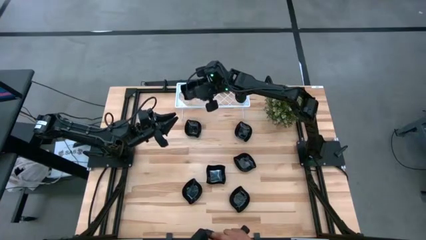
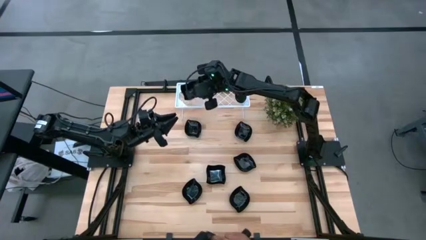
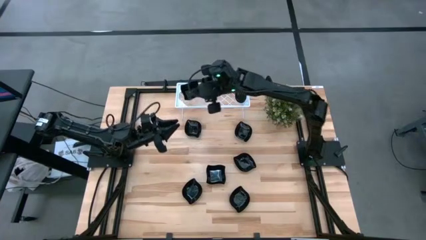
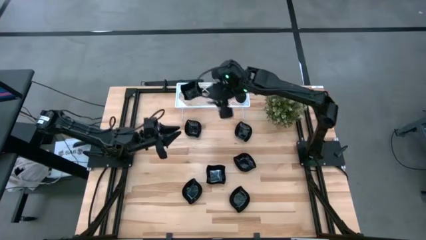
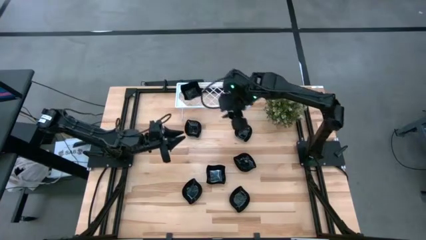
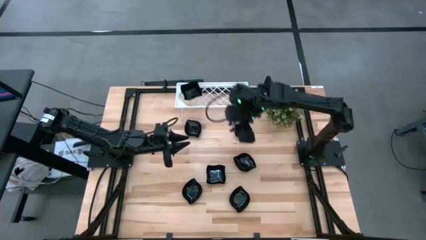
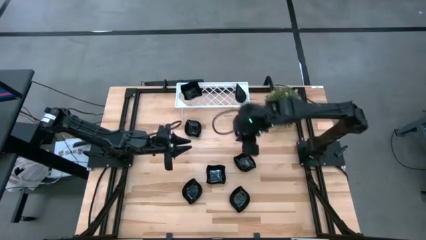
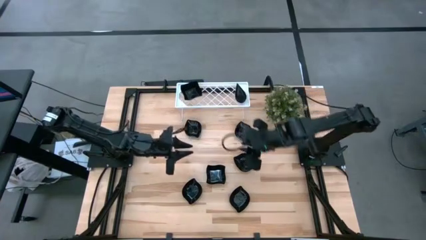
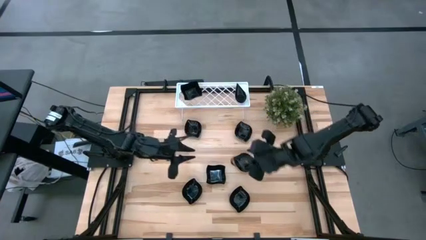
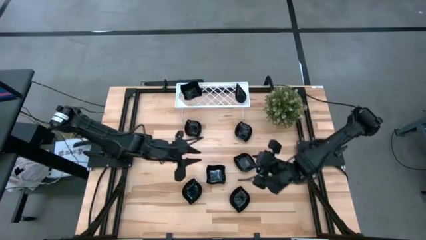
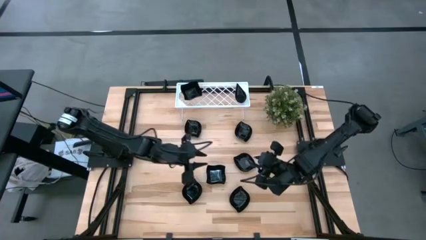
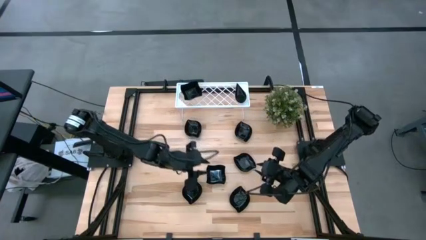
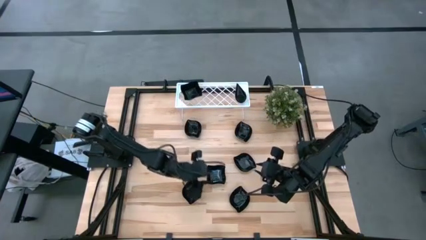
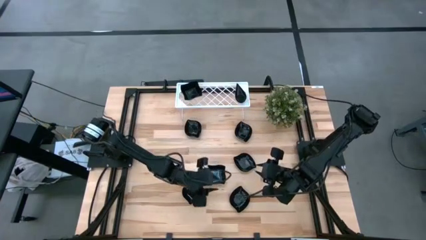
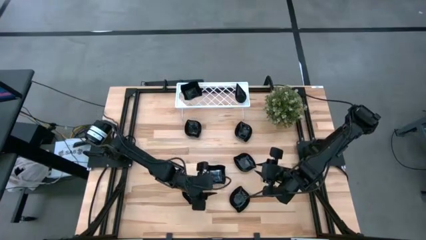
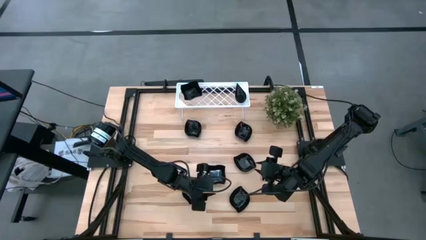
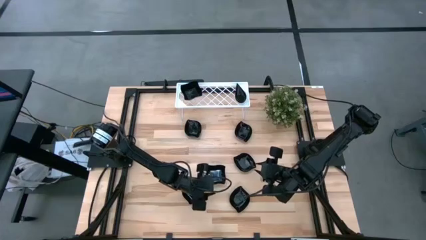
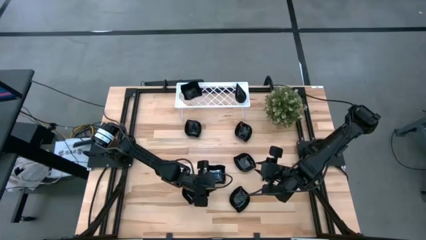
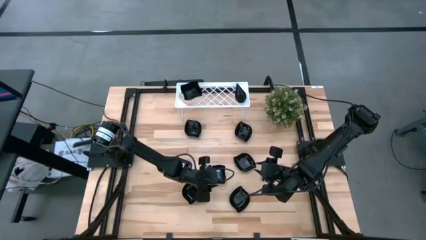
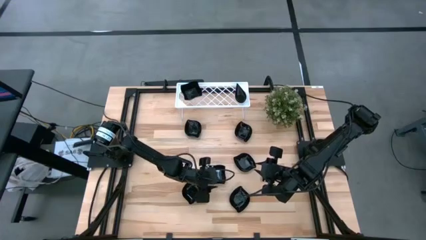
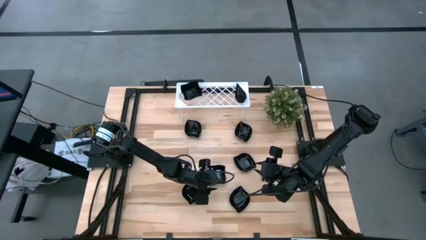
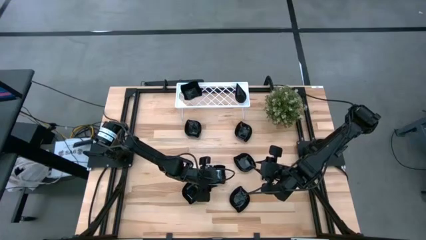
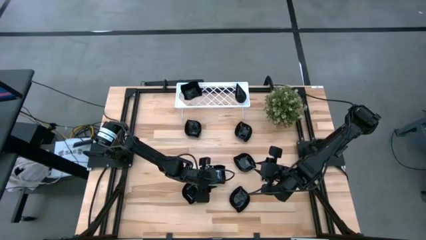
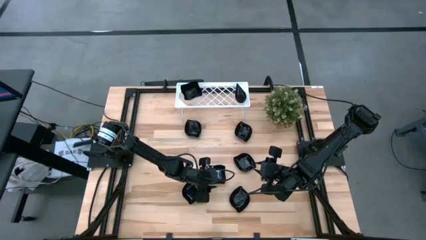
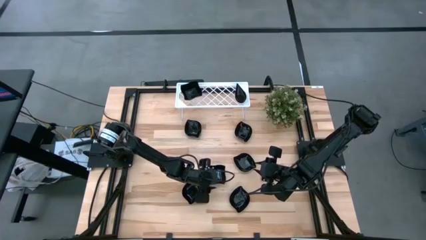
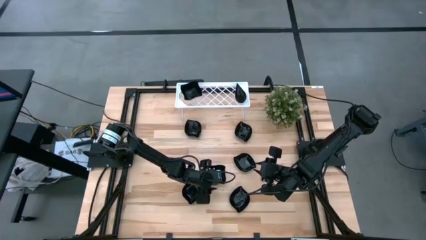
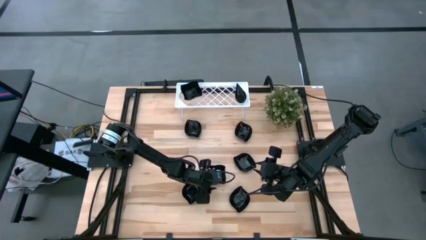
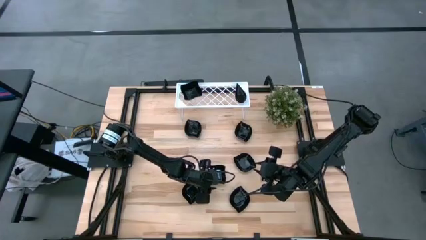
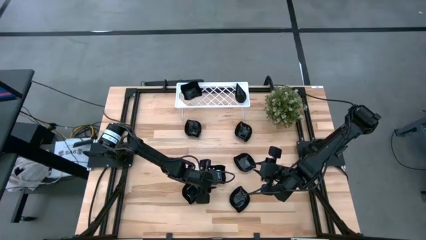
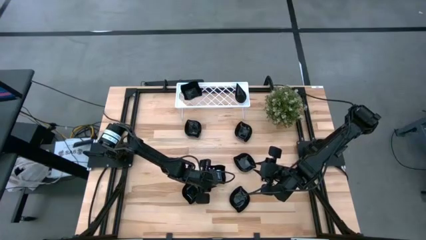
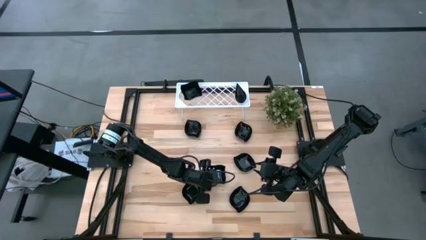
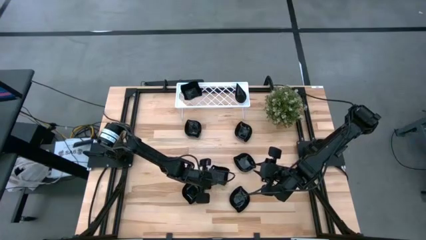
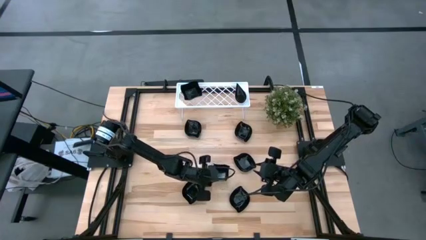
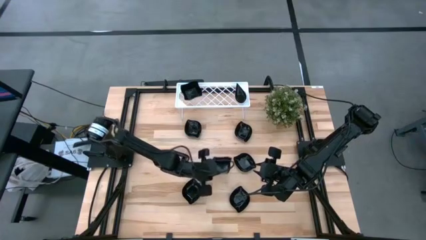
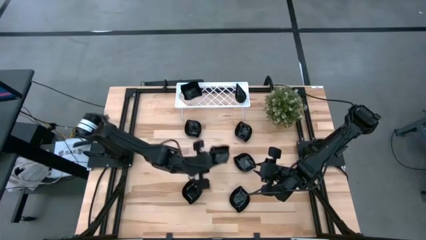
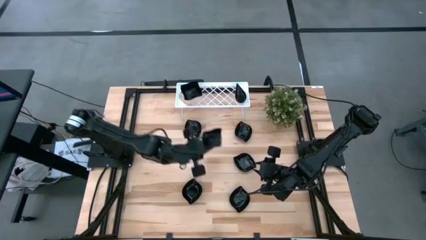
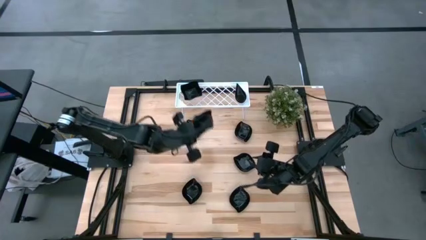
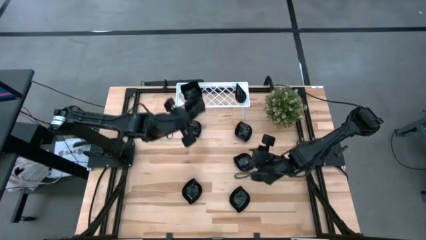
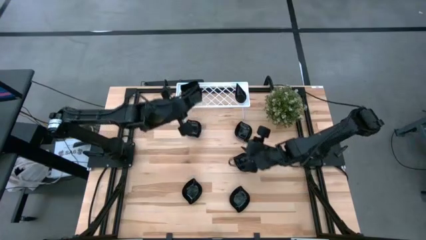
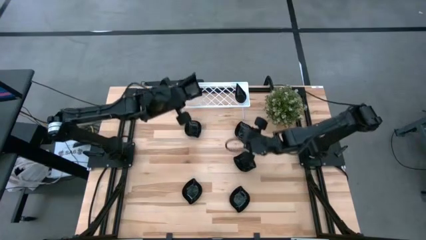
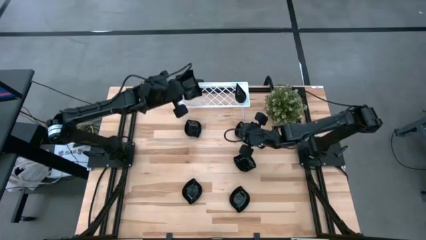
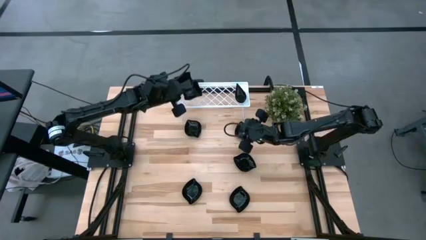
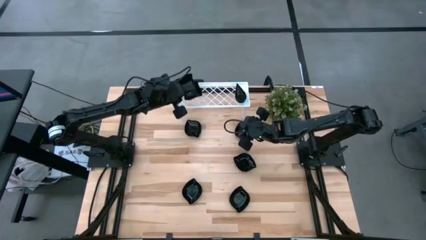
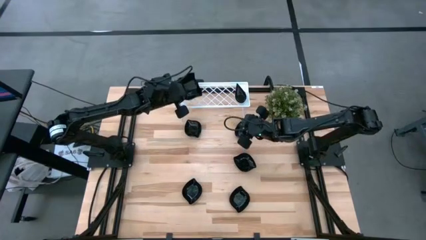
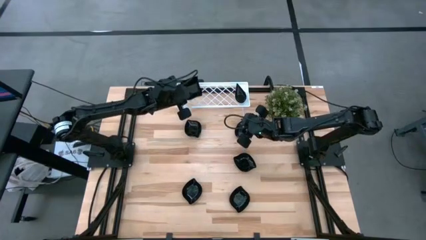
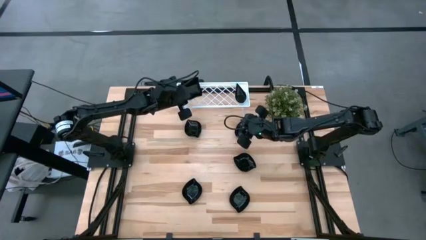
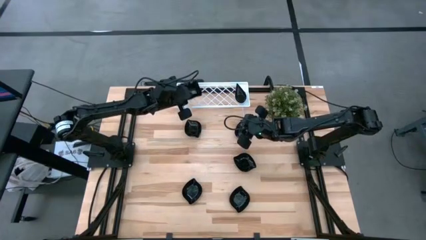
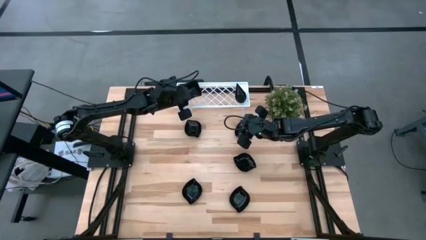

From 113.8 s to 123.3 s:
Task: Pick & Place Mini shaped plates
Stack the distorted square plate on top of the distorted square plate on the shelf

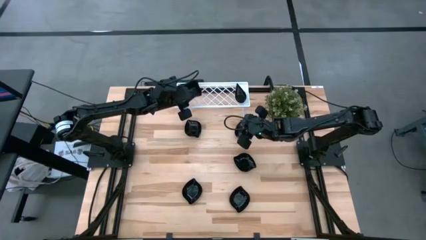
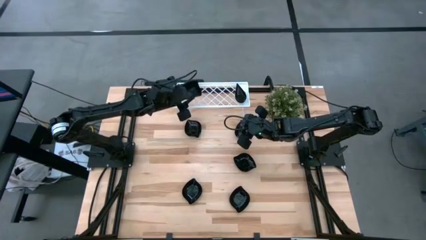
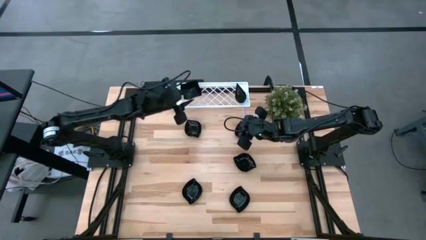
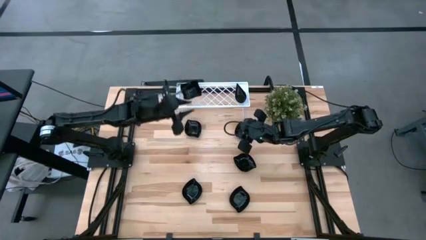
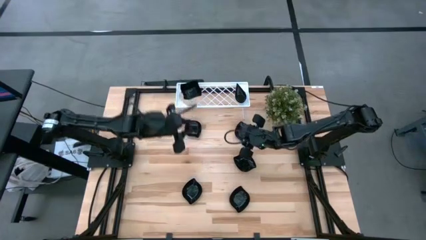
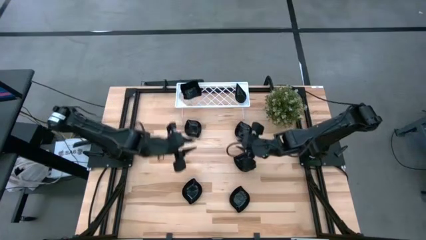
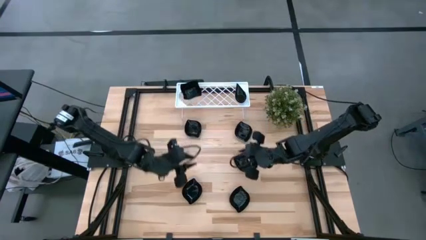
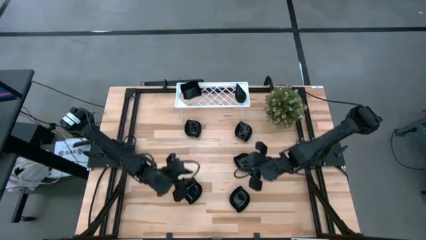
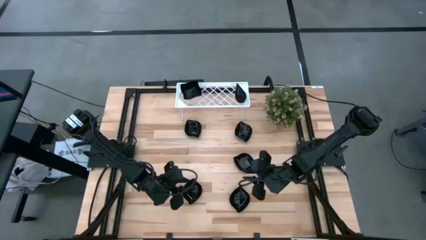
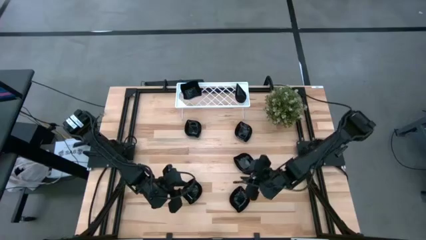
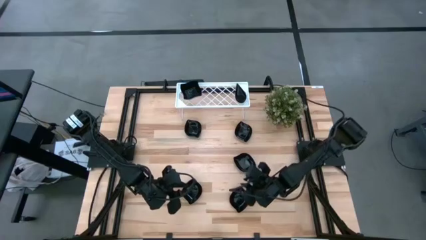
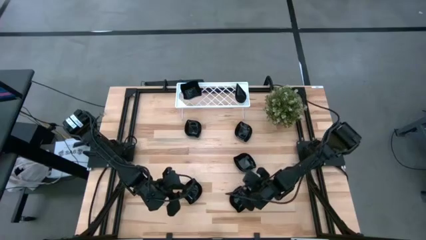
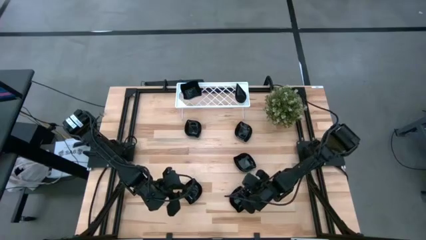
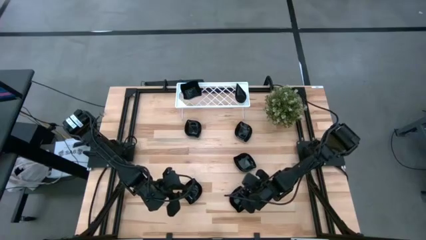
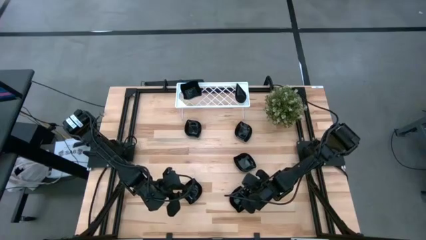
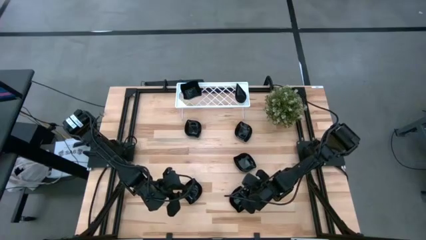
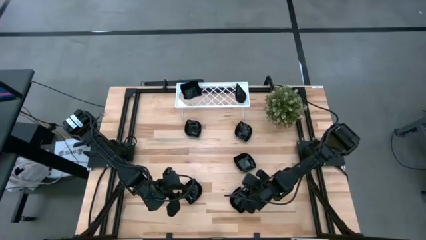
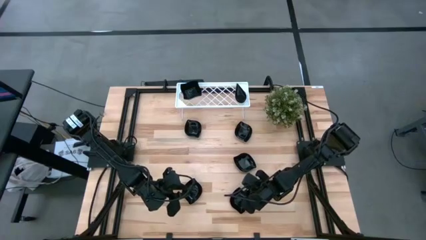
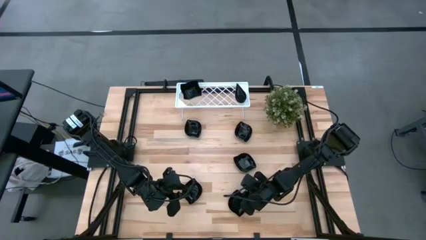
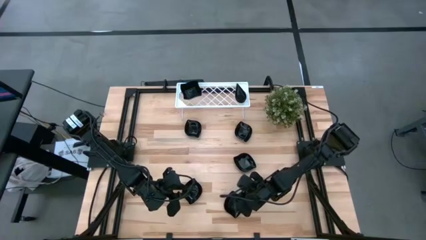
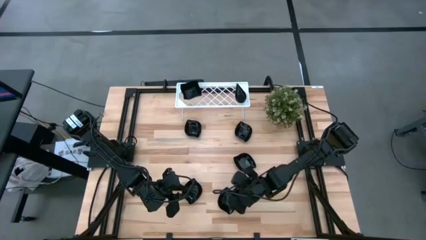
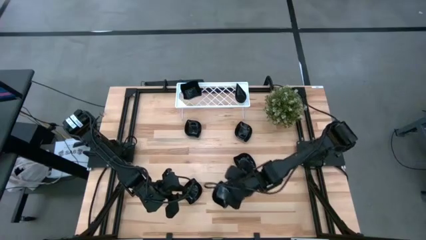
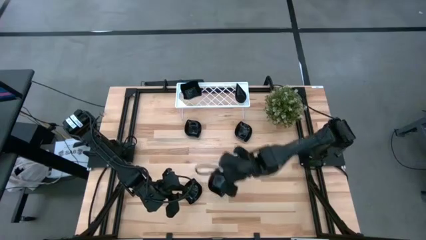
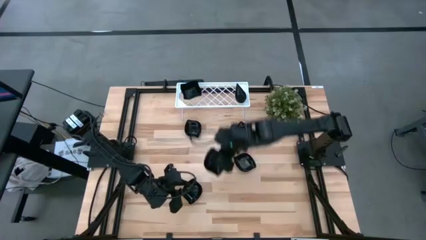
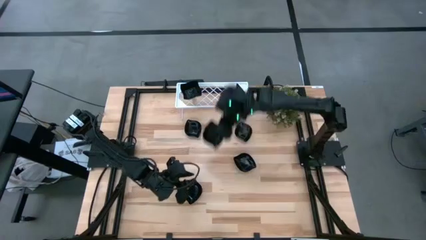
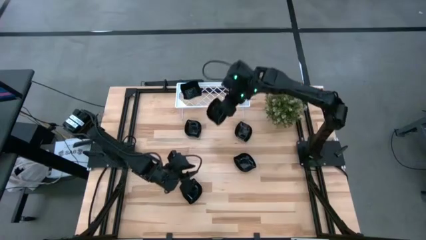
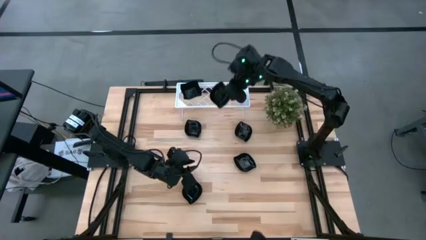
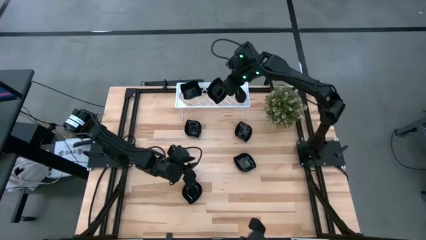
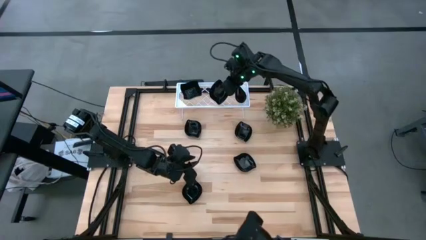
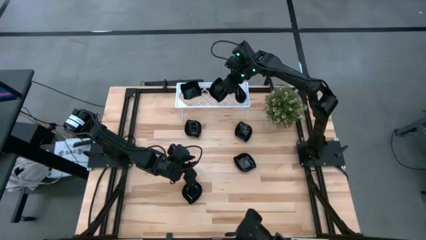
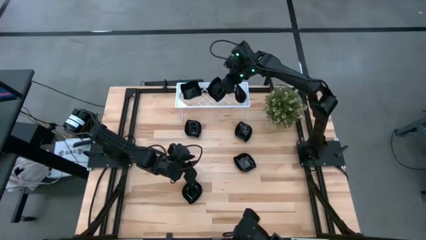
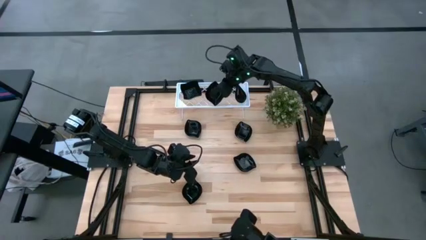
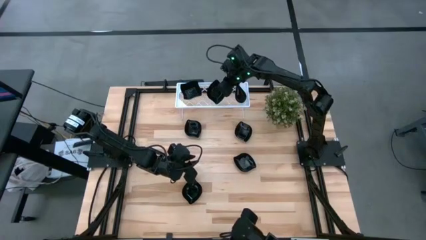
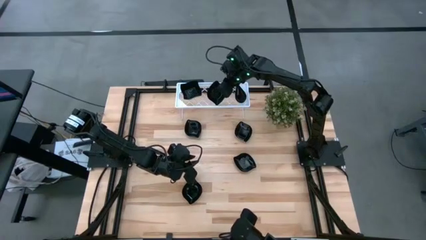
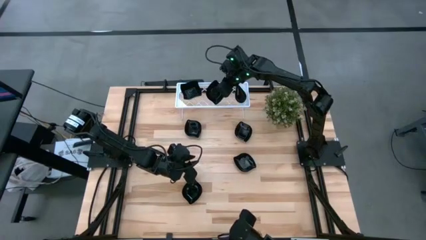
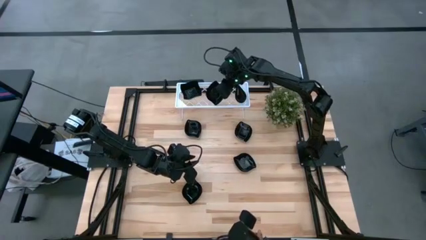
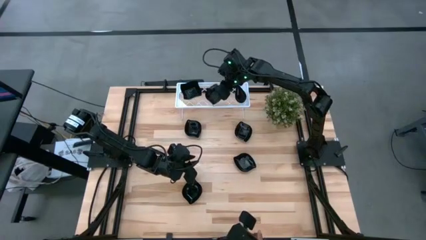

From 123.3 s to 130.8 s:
Put the leaf-shaped plate on the shelf
